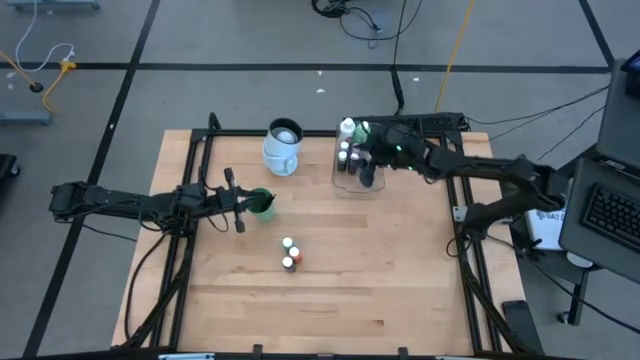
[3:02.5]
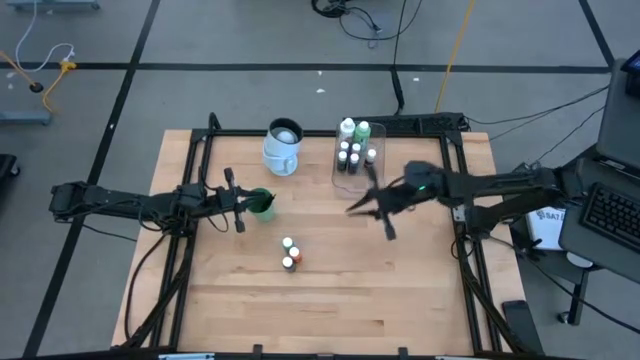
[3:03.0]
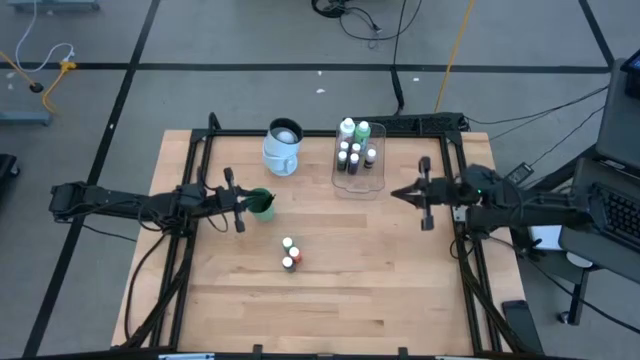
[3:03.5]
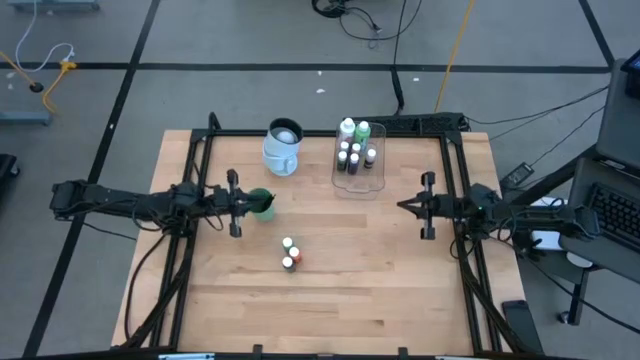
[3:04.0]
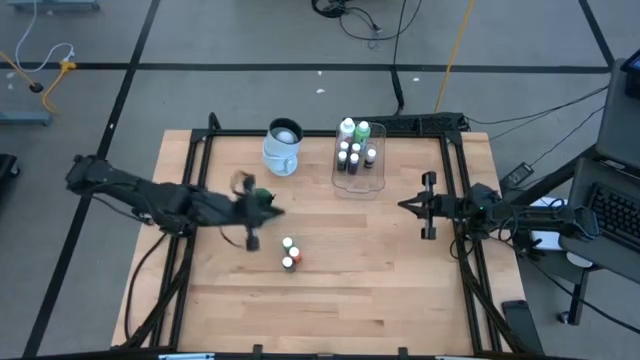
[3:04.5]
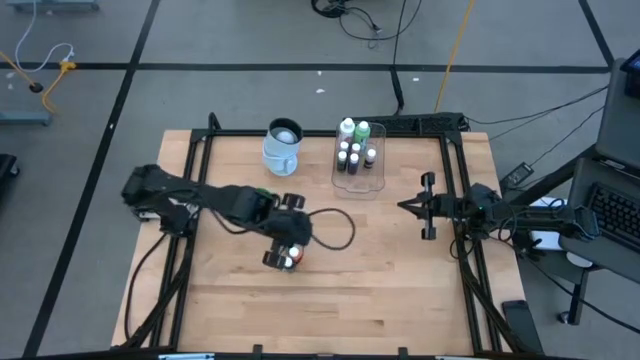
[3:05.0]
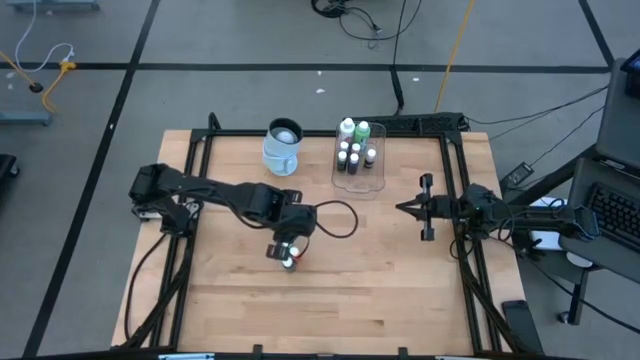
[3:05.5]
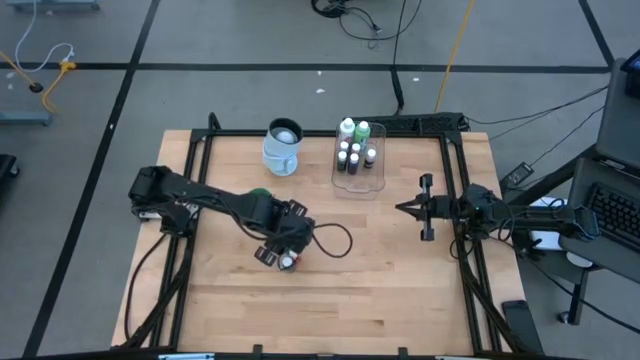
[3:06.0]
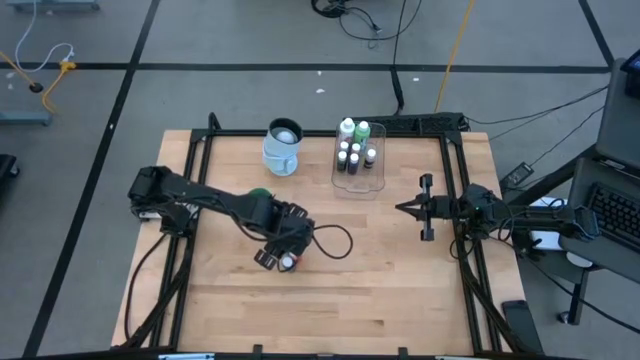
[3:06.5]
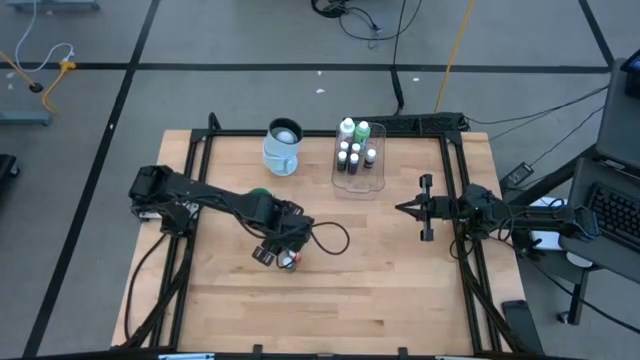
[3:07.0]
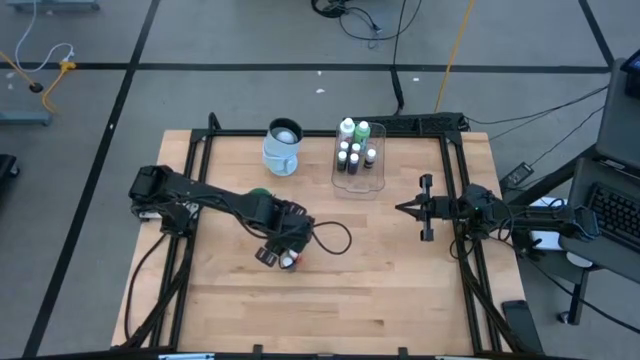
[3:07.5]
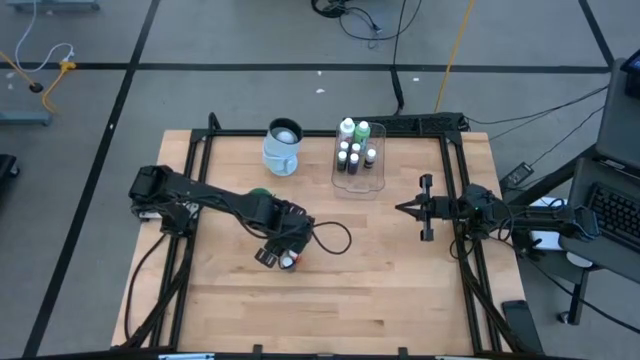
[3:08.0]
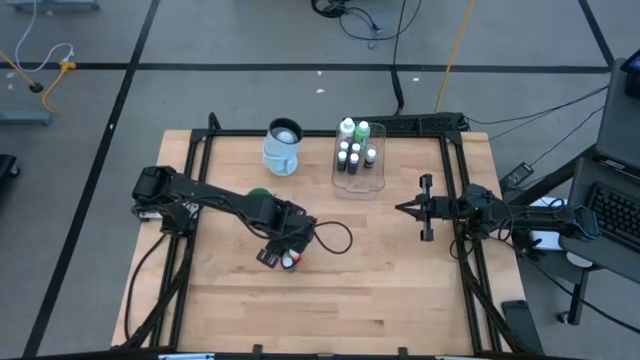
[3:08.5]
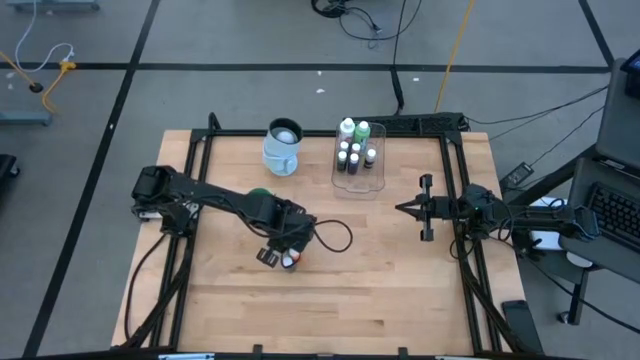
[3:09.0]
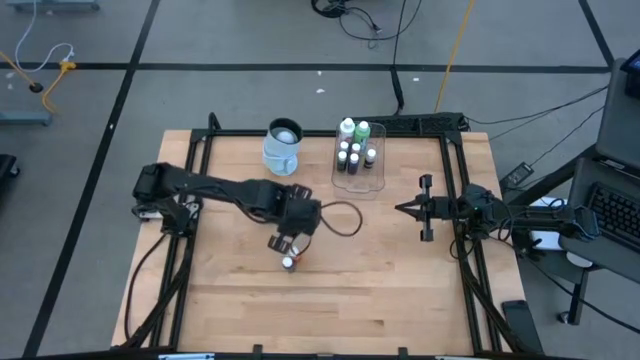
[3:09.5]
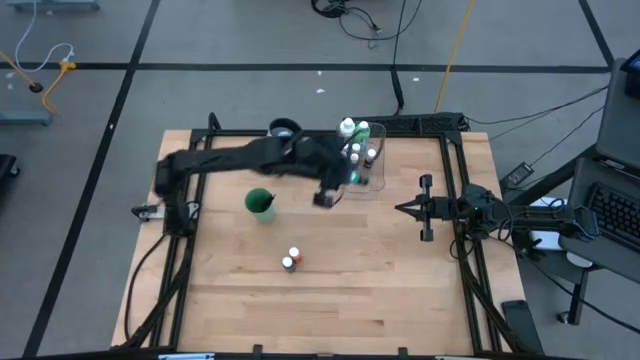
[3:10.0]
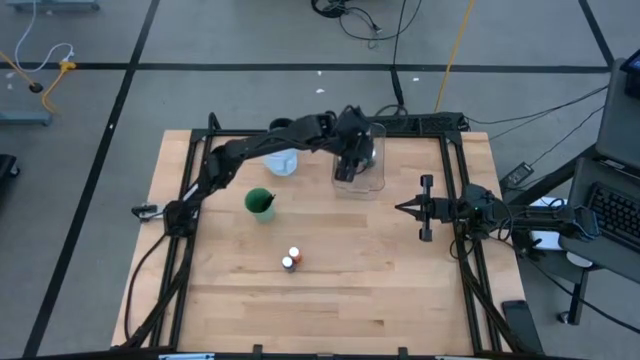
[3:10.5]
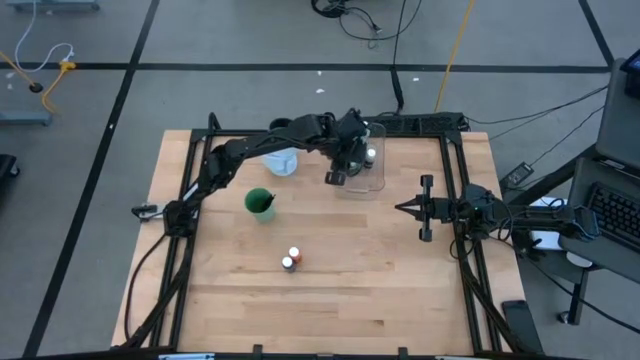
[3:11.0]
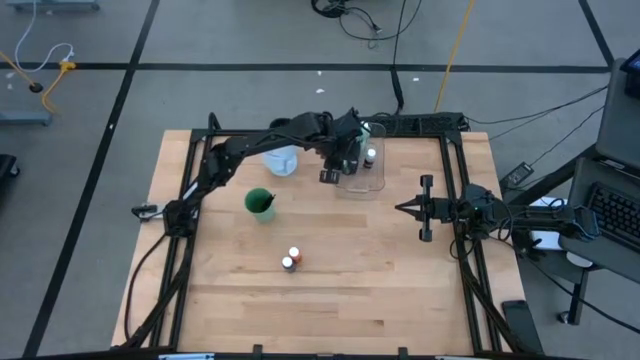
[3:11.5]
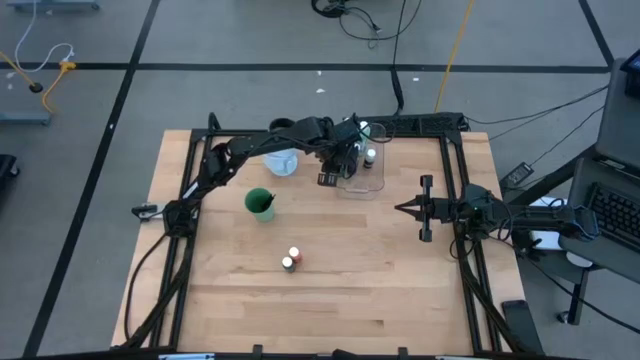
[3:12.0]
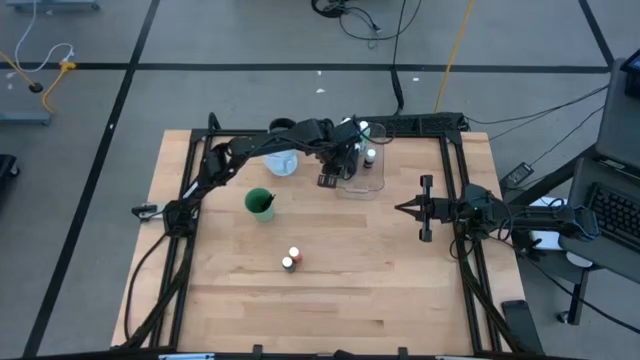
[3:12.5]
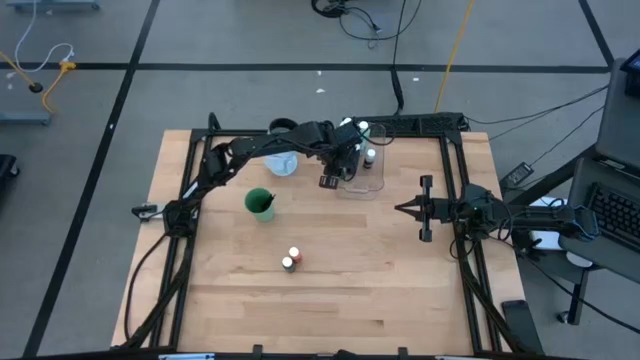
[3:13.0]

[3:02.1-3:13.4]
Task: Pick & Place Paint Supplies
Put the green paint bottle into the transparent bin

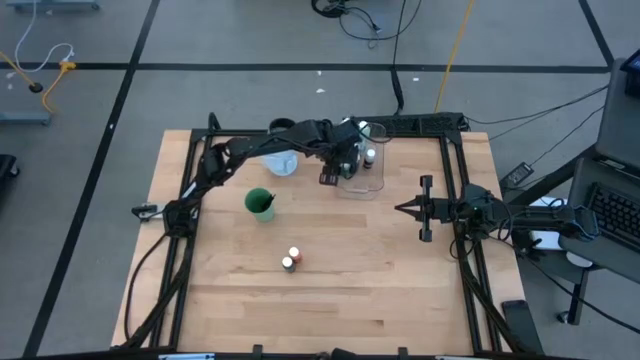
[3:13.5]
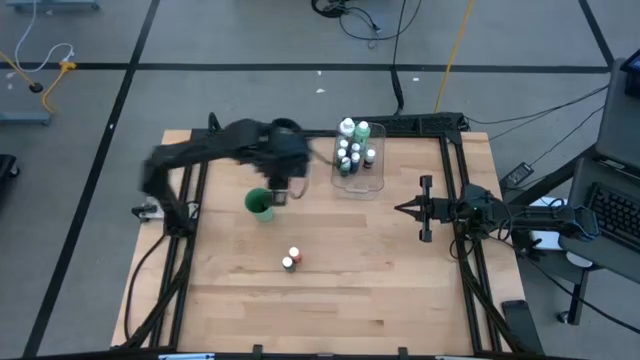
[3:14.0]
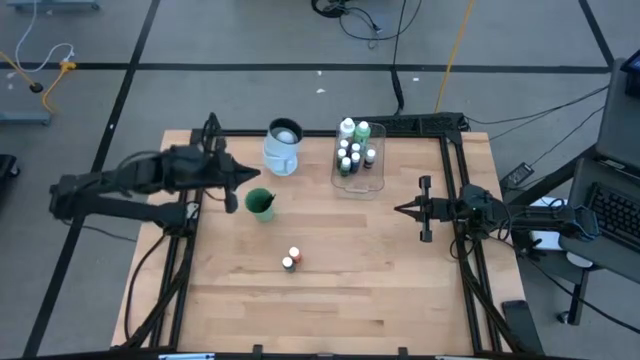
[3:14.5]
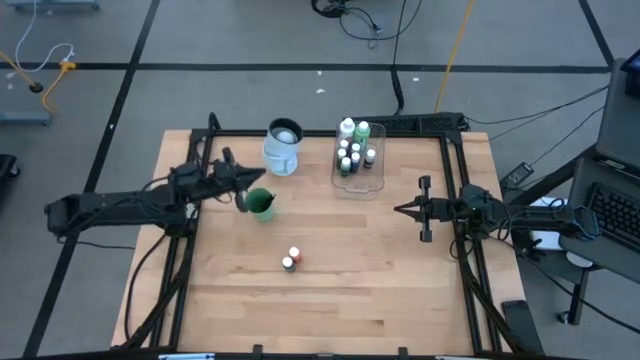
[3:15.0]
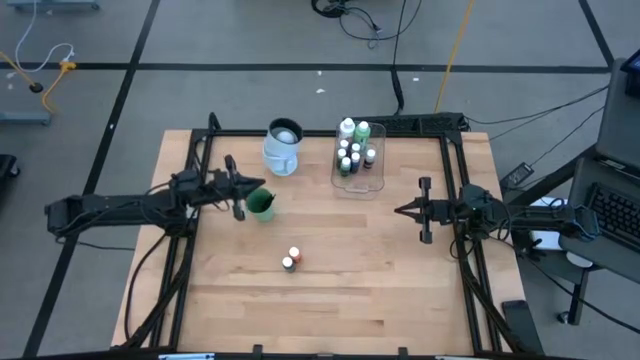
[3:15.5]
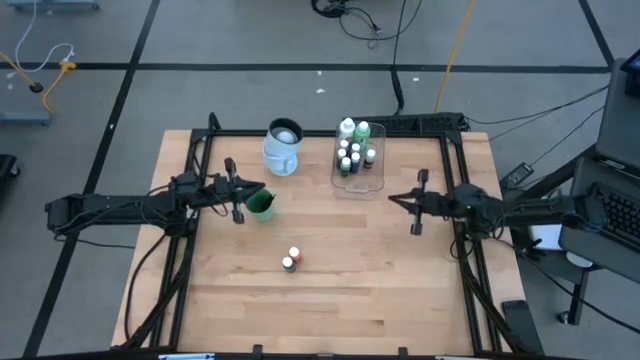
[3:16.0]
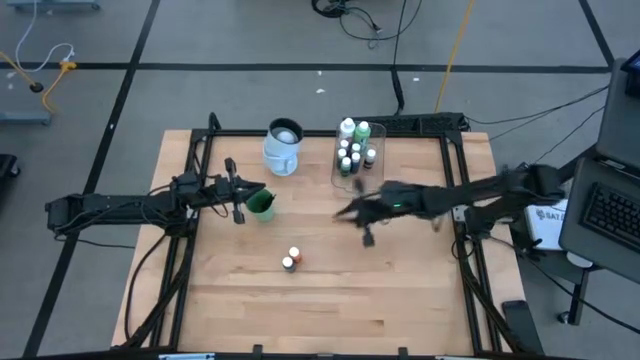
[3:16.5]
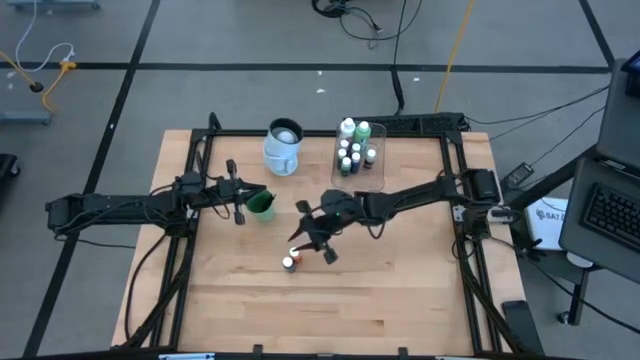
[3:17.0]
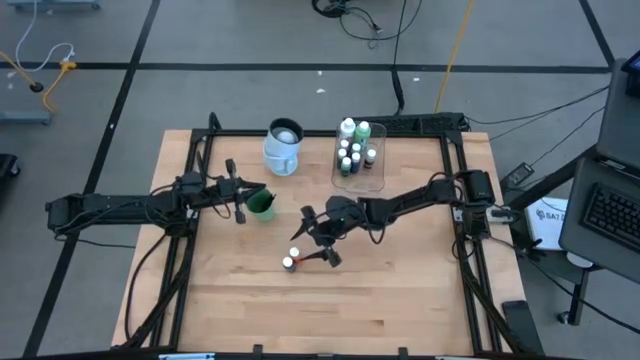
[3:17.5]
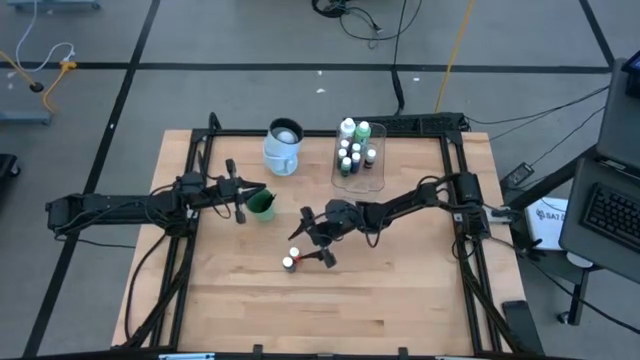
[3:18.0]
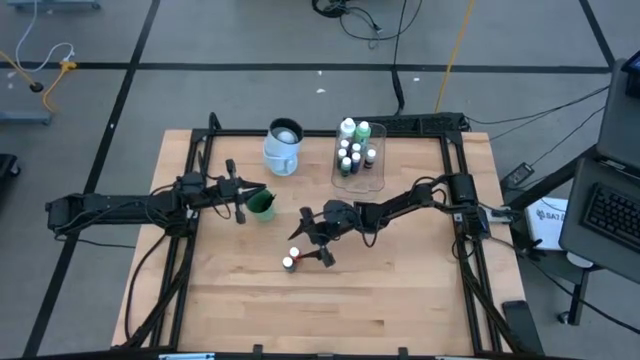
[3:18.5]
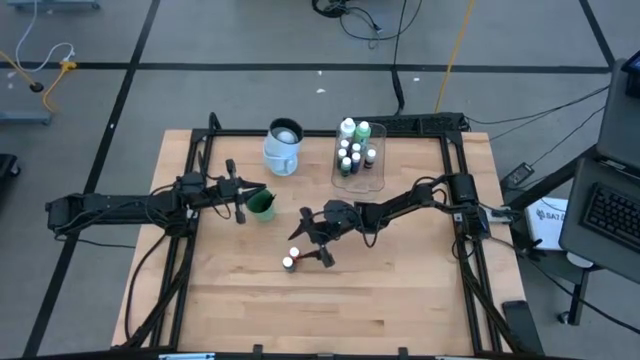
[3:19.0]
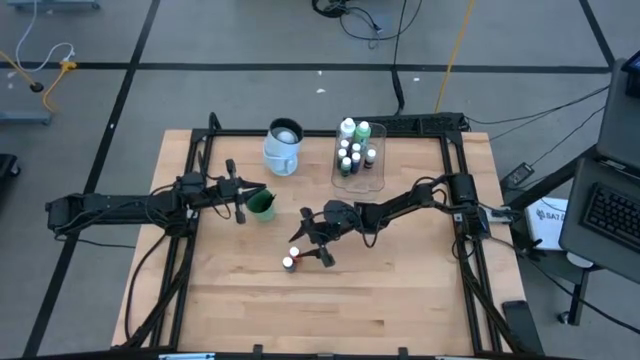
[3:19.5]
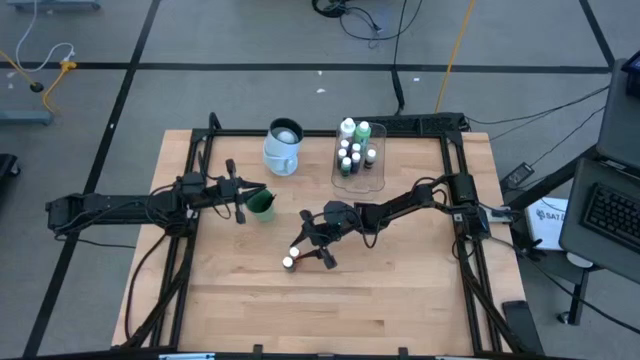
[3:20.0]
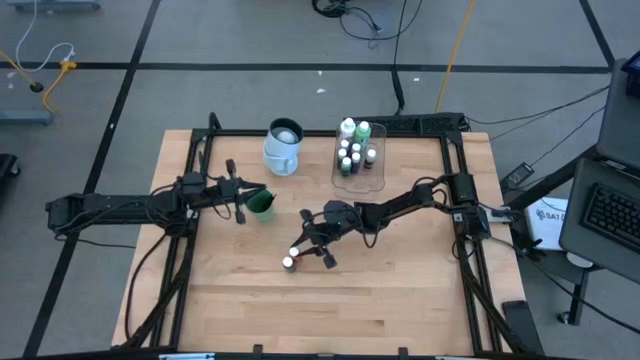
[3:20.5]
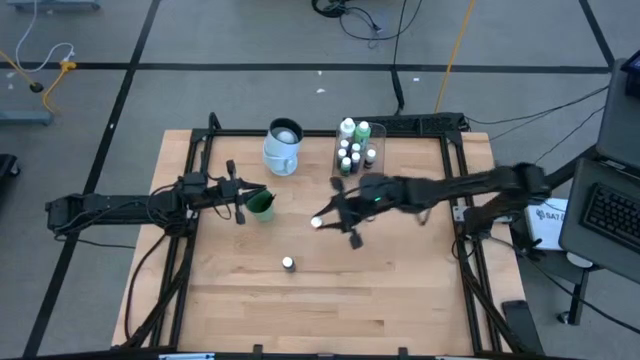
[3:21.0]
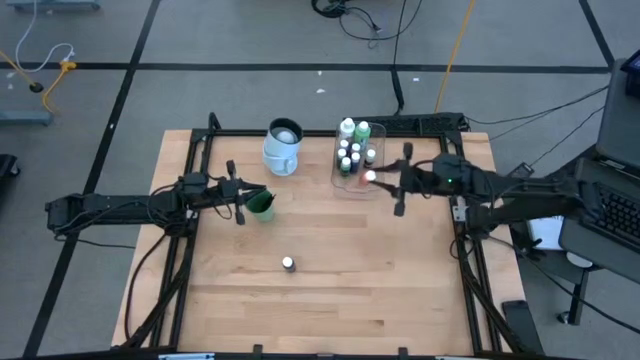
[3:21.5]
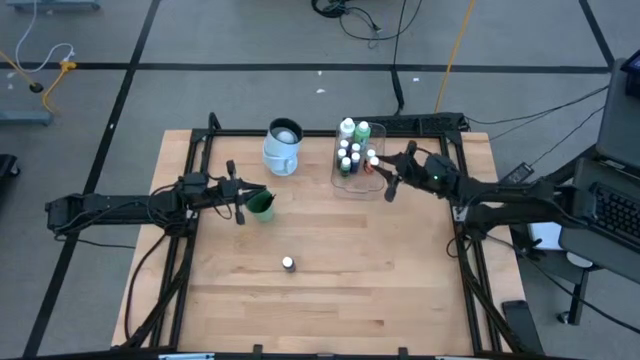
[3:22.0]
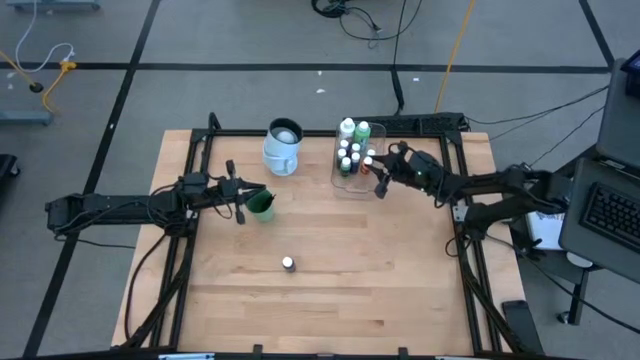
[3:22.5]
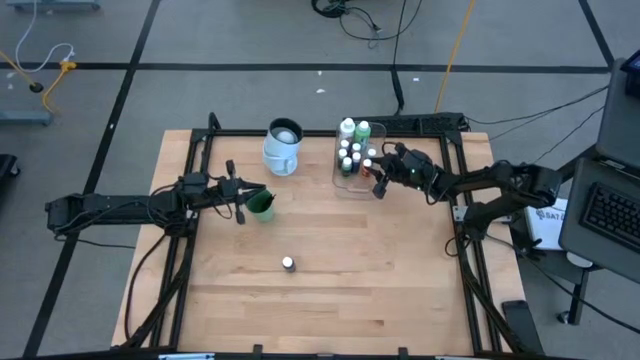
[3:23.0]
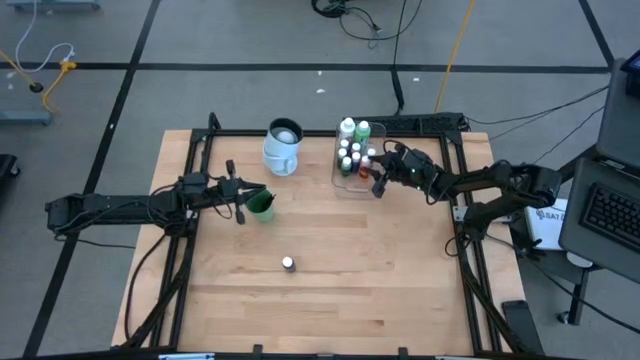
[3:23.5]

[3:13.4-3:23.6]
Put the orange paint bottle into the transparent bin
